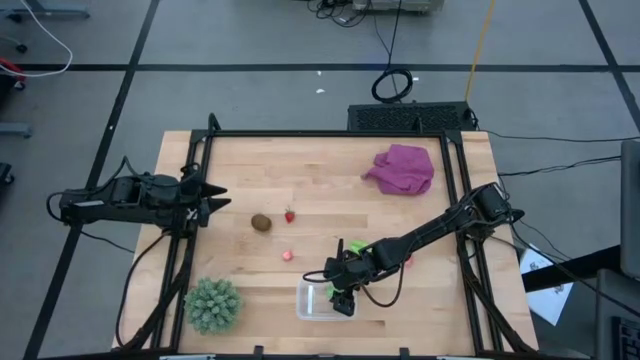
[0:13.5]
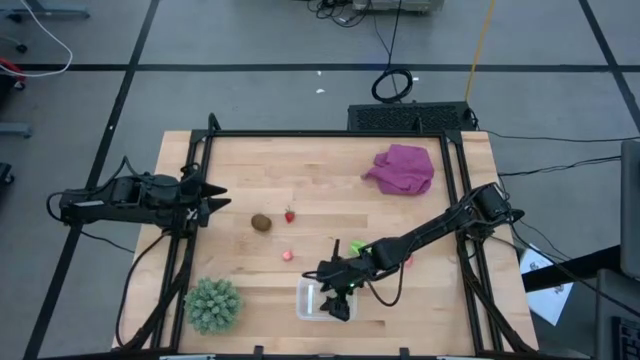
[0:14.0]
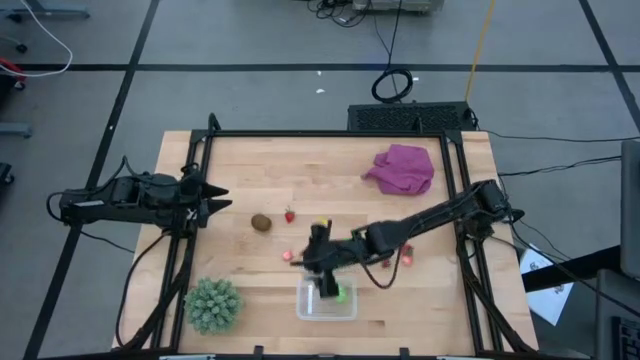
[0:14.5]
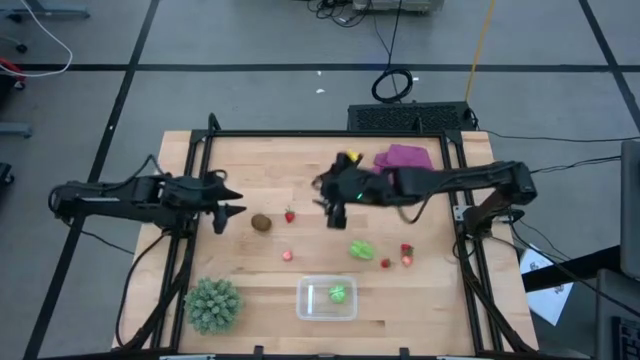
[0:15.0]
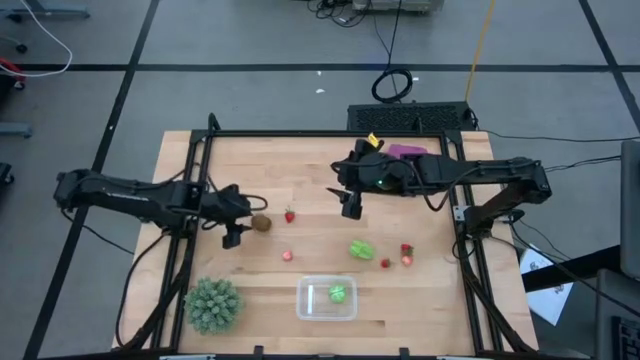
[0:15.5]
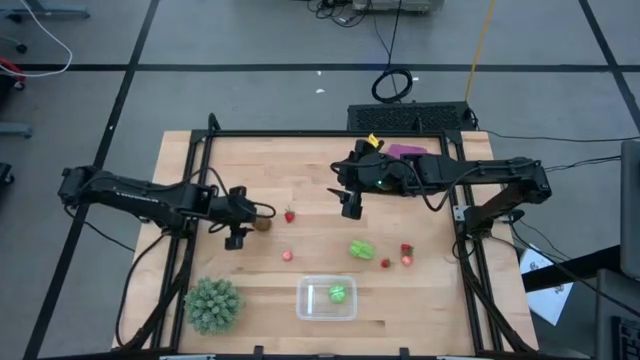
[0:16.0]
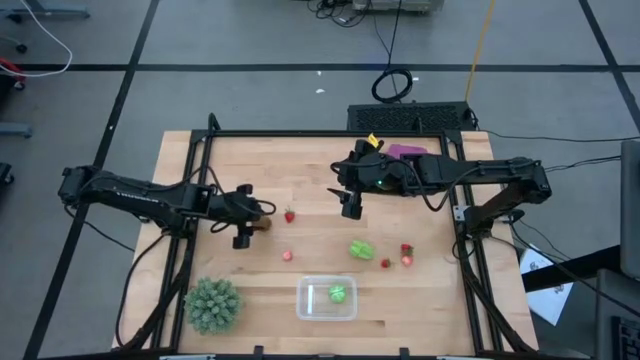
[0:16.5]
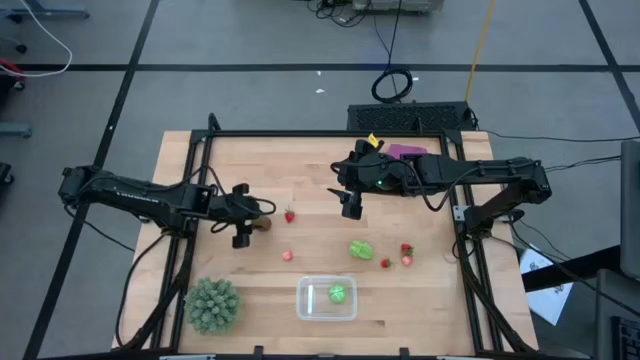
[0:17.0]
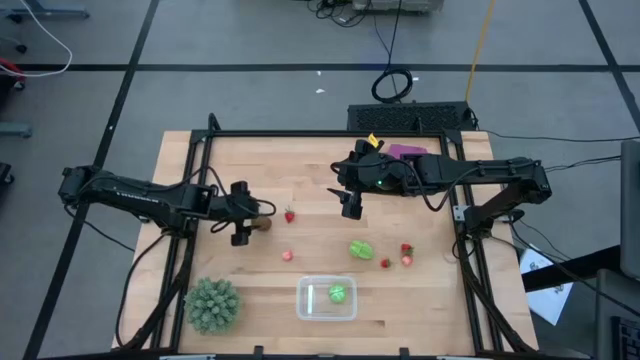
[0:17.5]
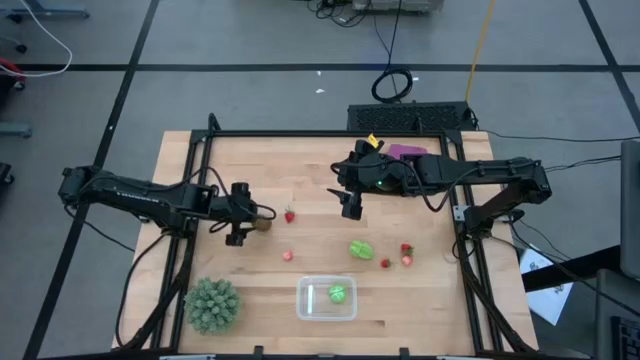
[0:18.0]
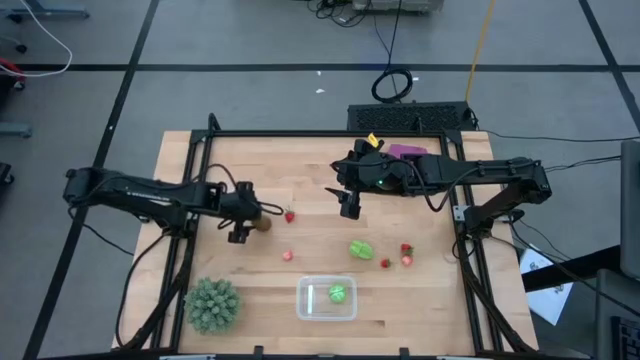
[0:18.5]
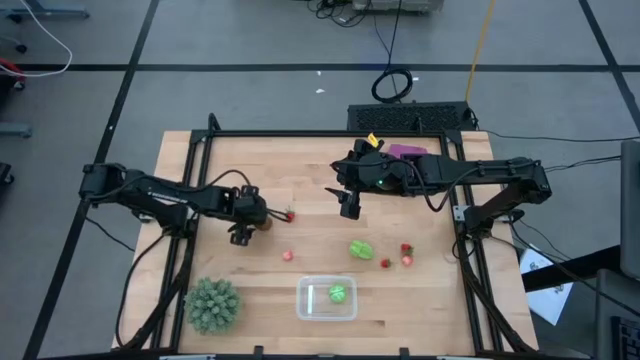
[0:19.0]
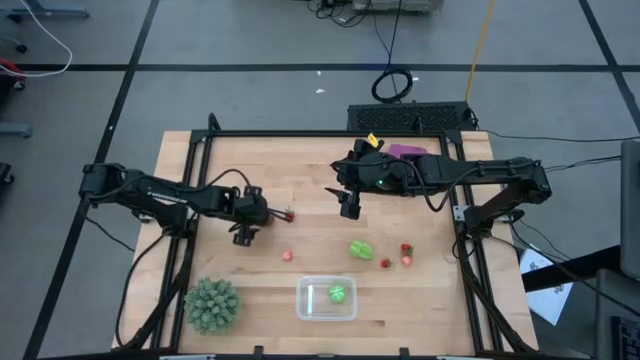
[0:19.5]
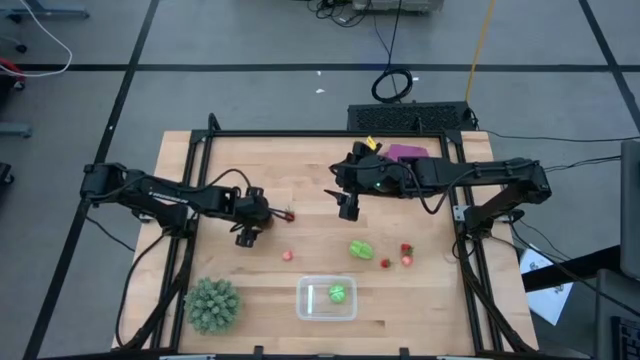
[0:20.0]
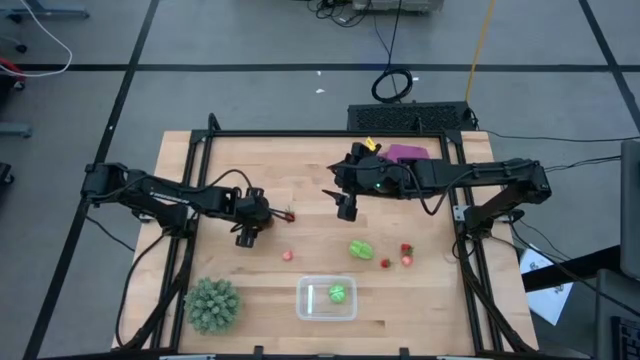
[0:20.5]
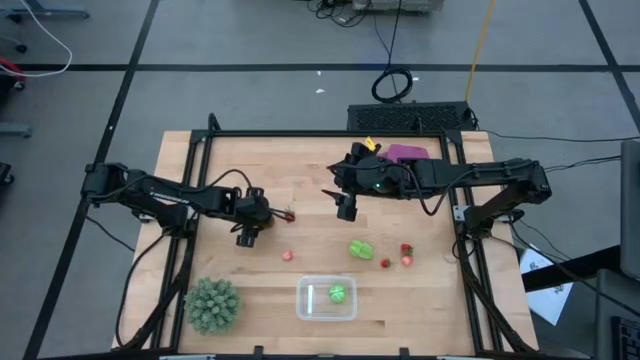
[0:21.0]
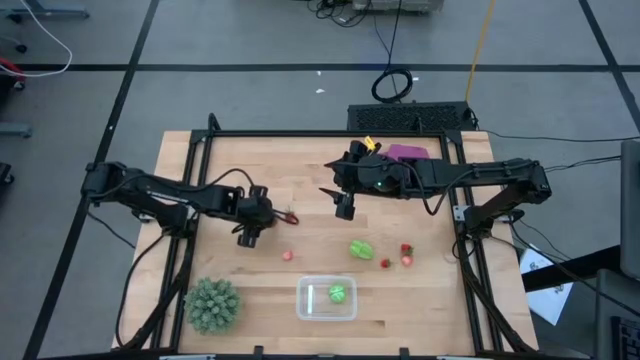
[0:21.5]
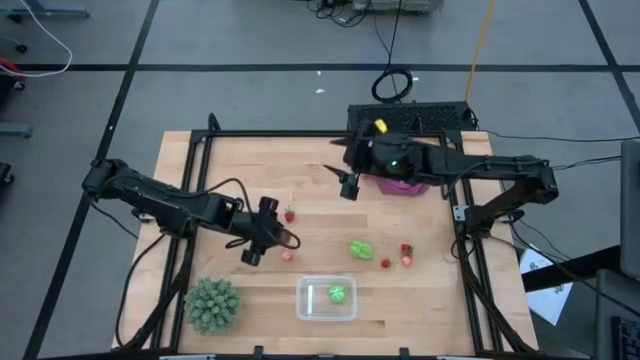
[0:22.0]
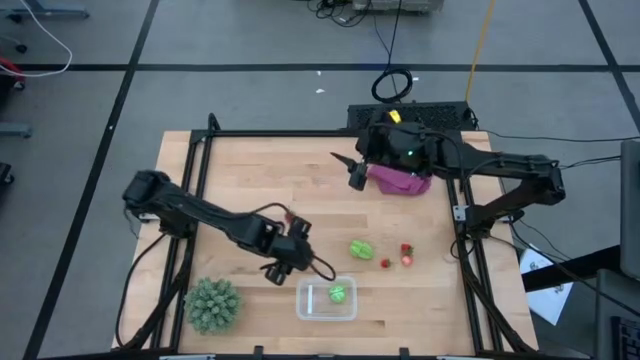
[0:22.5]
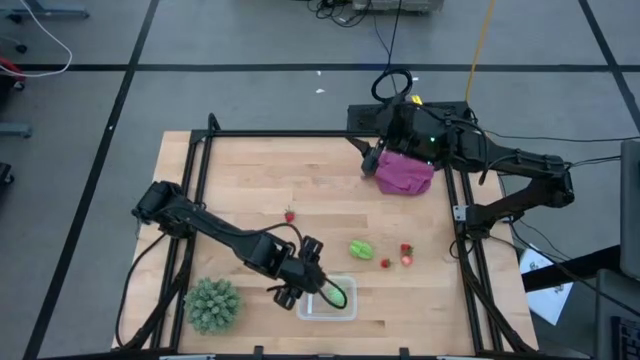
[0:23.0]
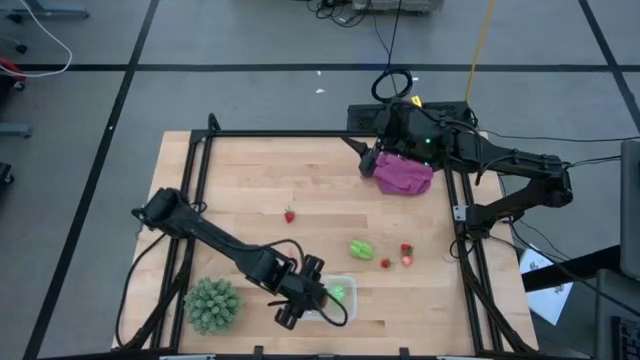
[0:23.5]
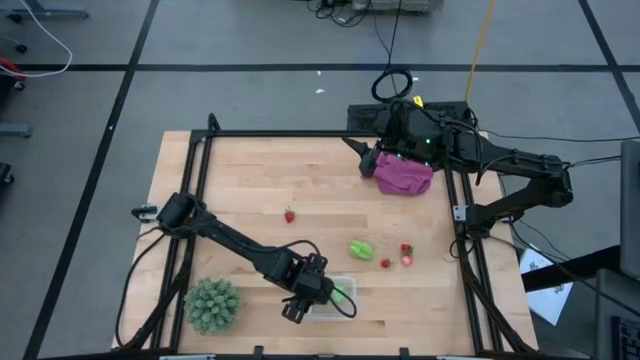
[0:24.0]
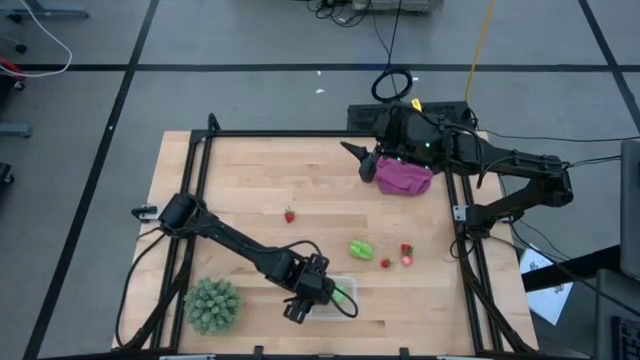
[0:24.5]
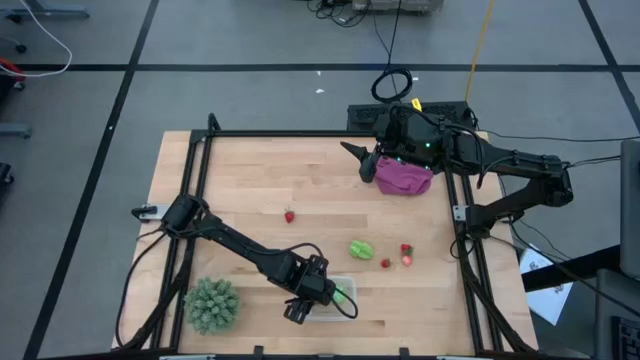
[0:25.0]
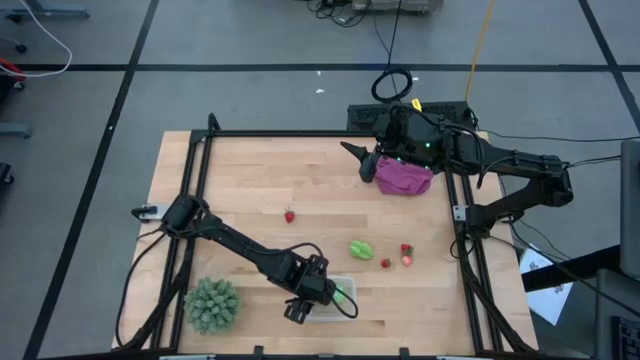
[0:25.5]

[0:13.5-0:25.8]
Task: Pick and placing Produce into tupperware
Put the brown kiwi into the transparent bin

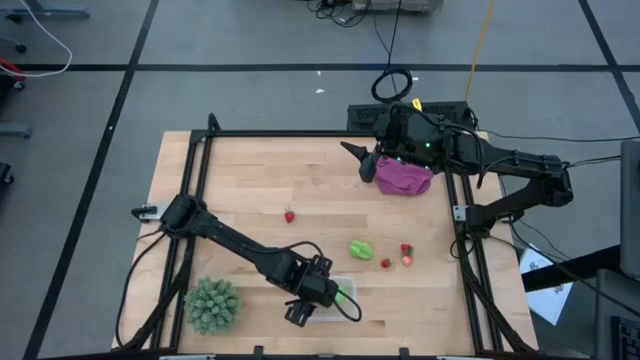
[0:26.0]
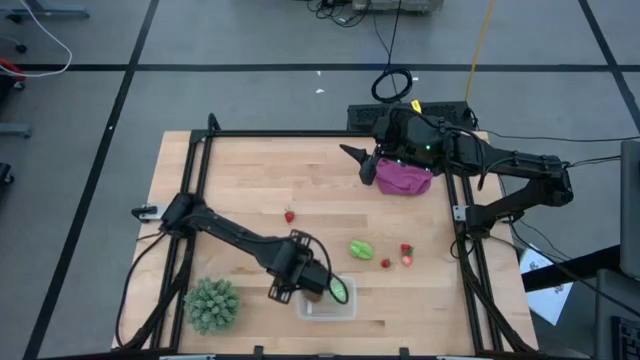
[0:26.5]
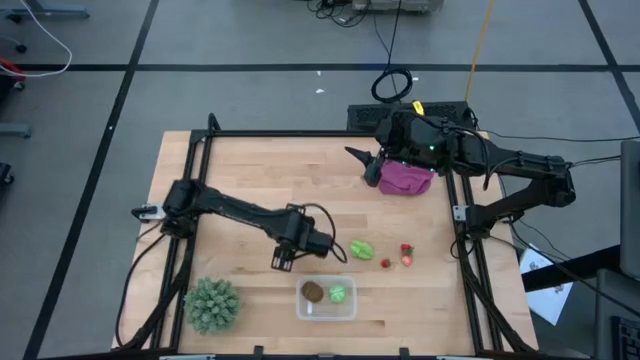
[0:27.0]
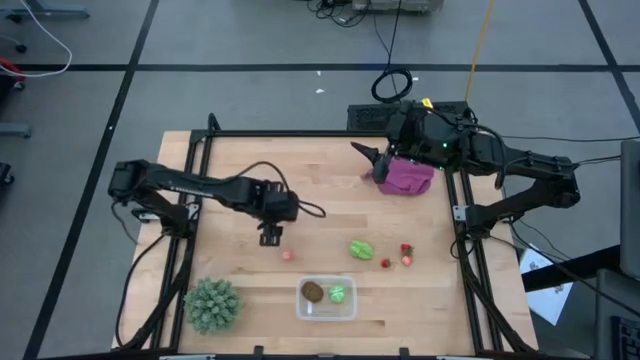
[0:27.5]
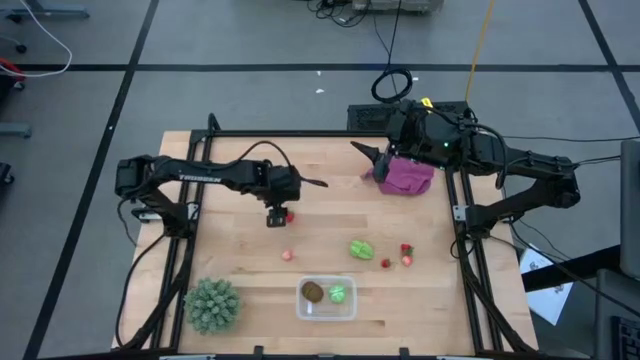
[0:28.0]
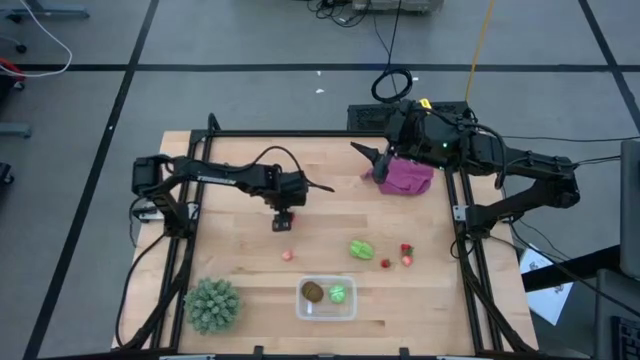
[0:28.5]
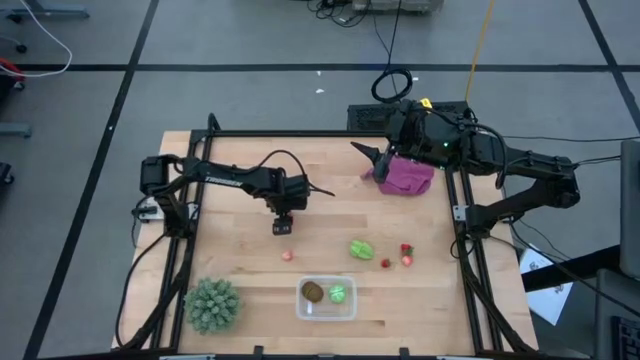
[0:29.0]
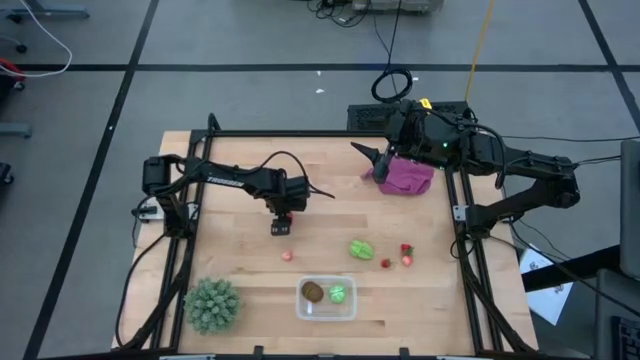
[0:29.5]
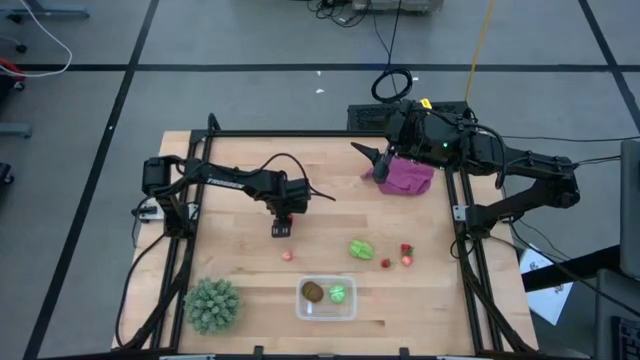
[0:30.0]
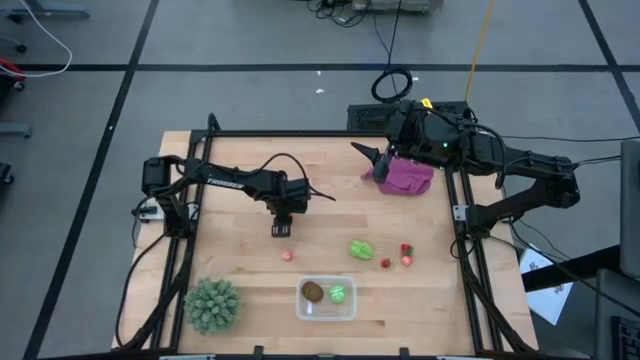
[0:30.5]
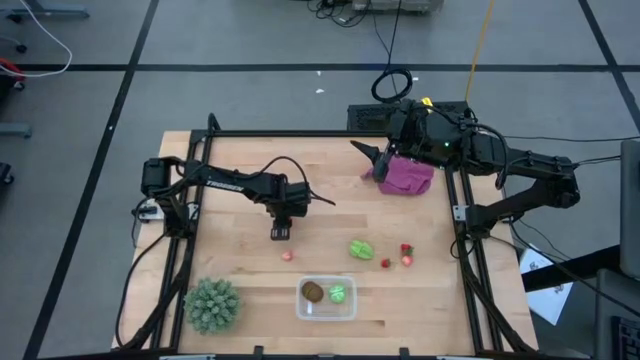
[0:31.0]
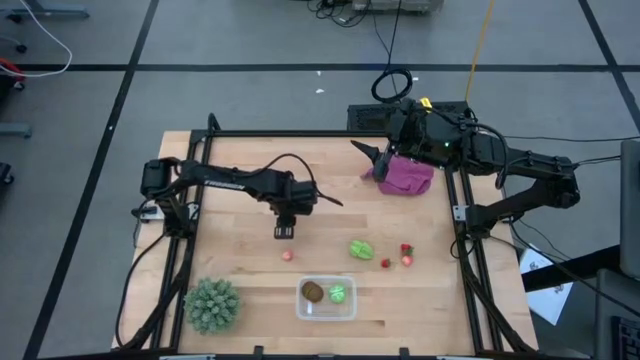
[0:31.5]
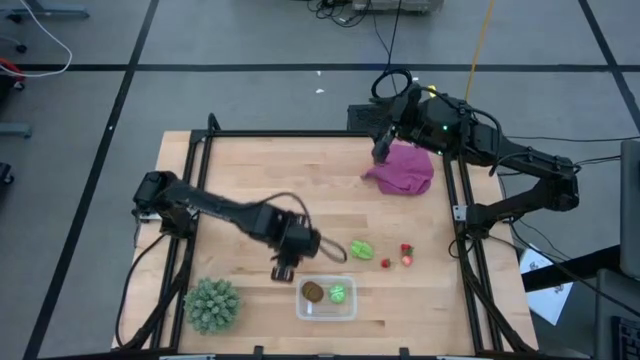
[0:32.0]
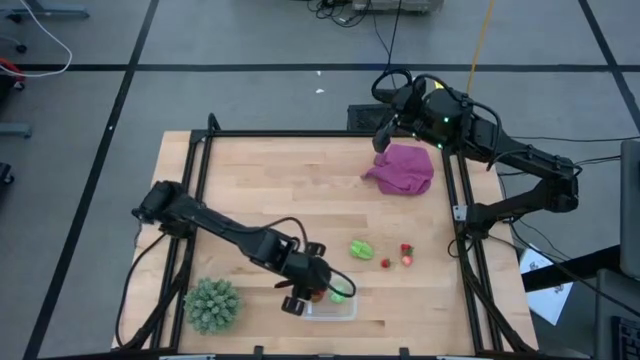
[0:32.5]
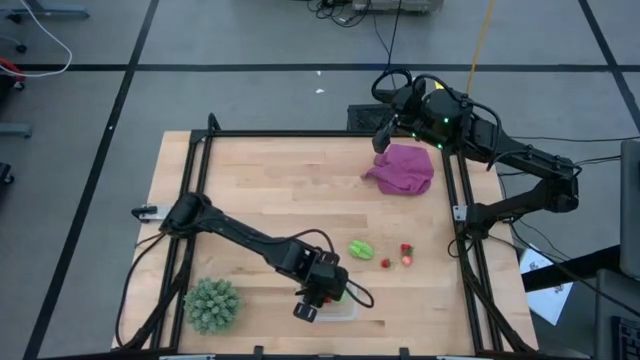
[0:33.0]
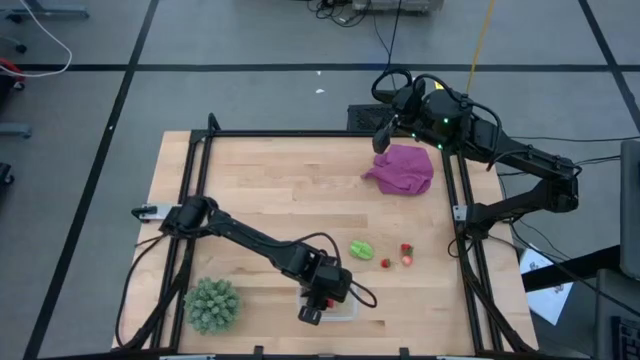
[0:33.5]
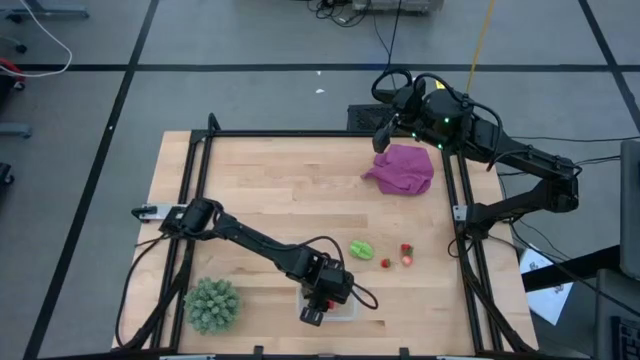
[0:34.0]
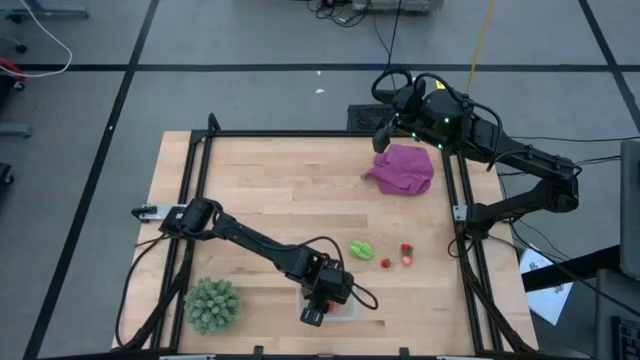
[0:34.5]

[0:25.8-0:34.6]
Put the top red strawberry into the transparent bin
